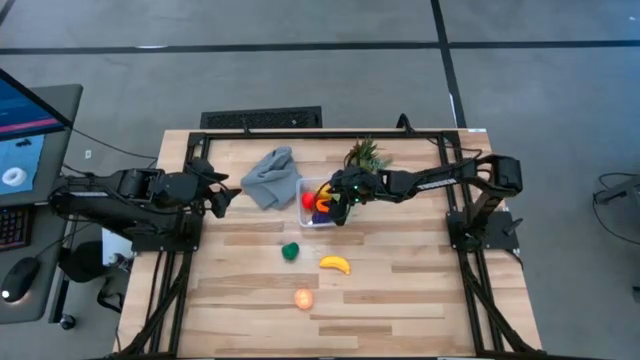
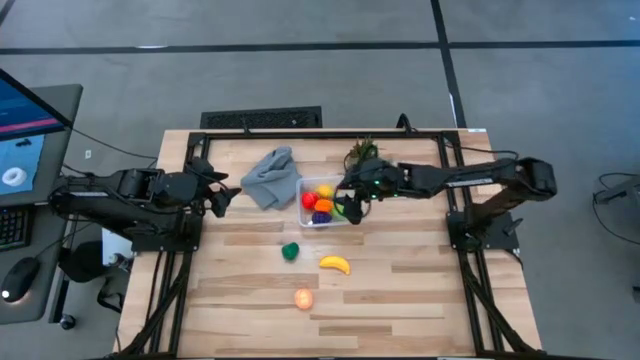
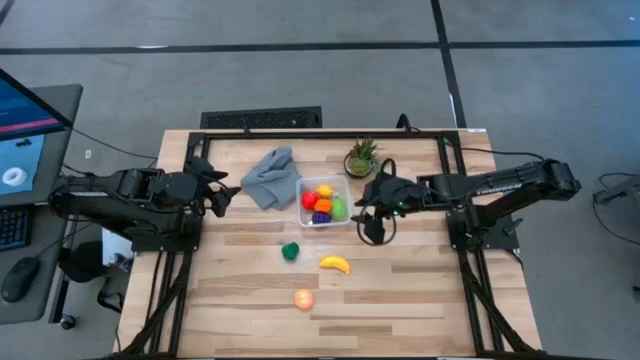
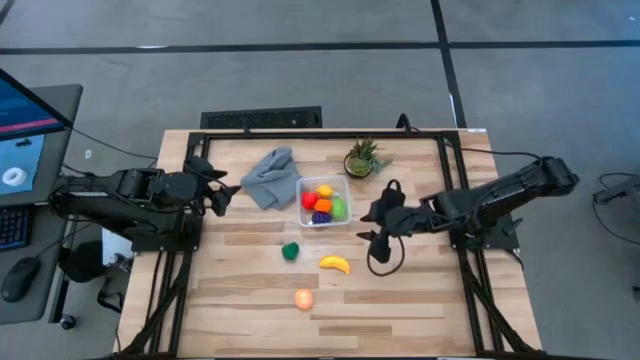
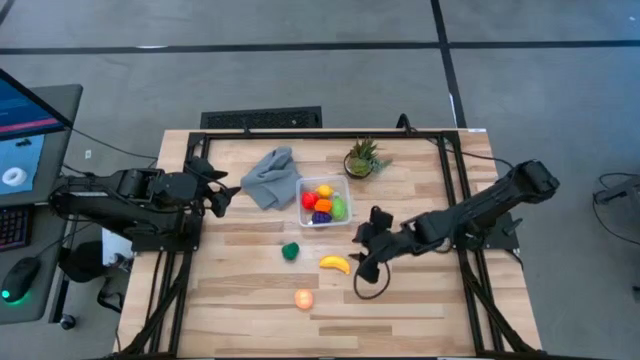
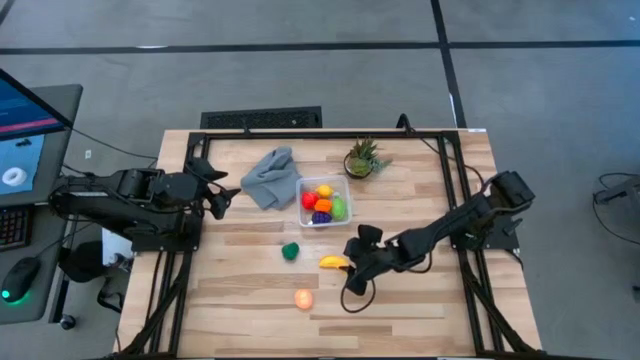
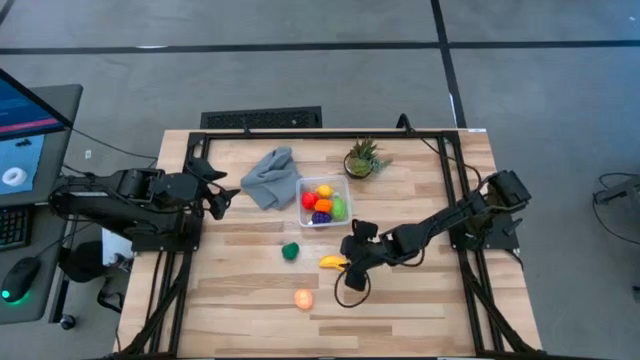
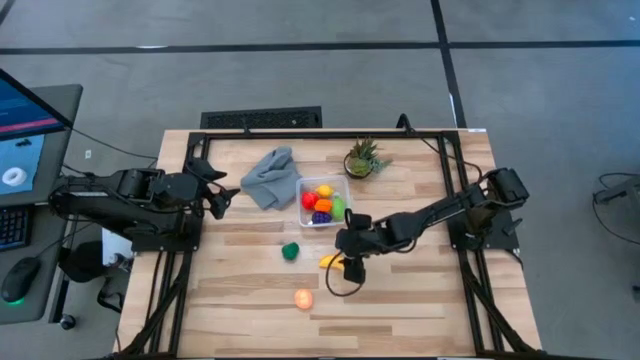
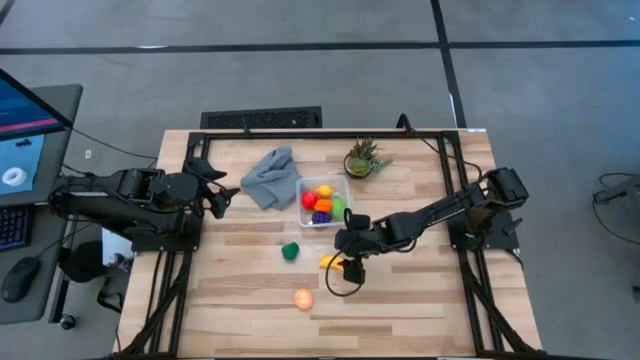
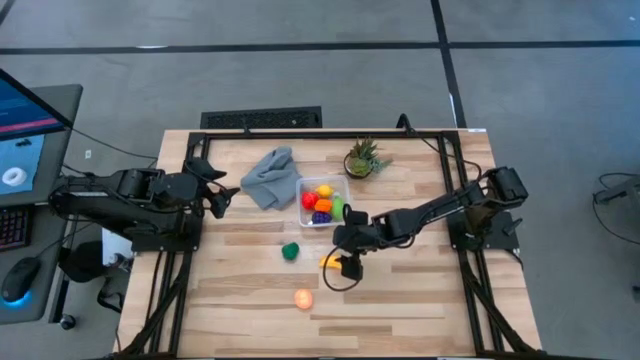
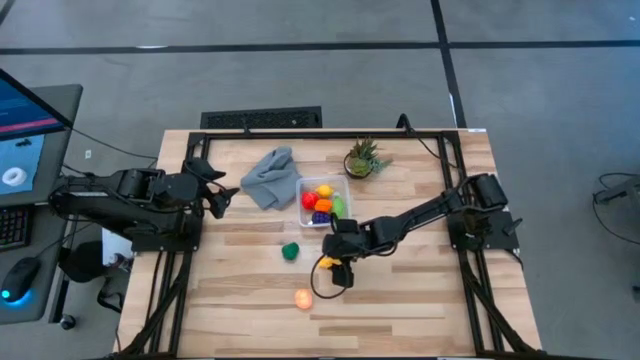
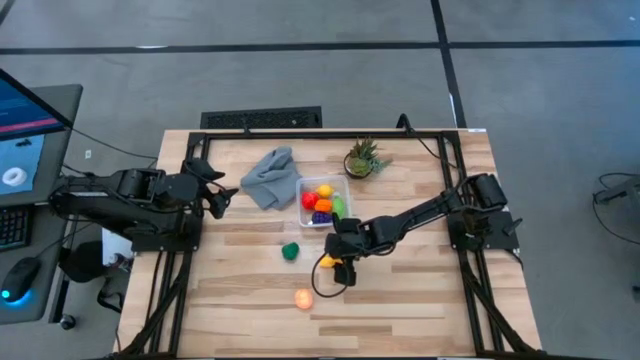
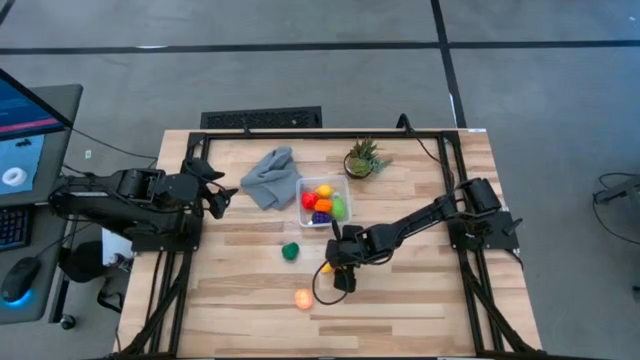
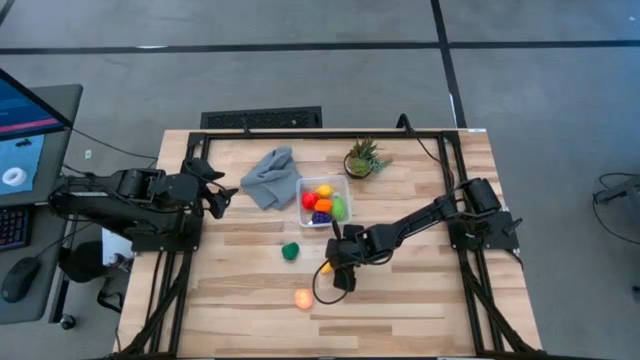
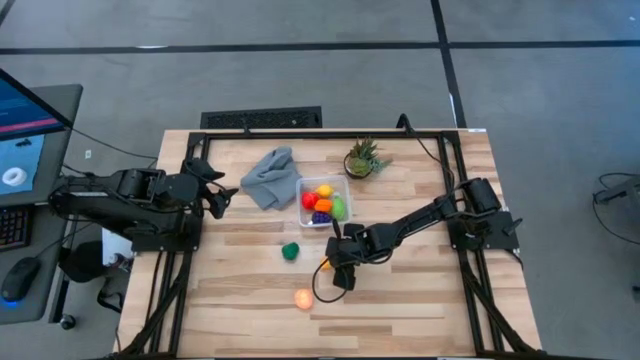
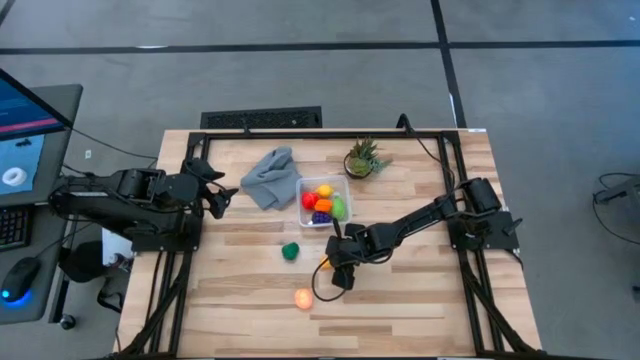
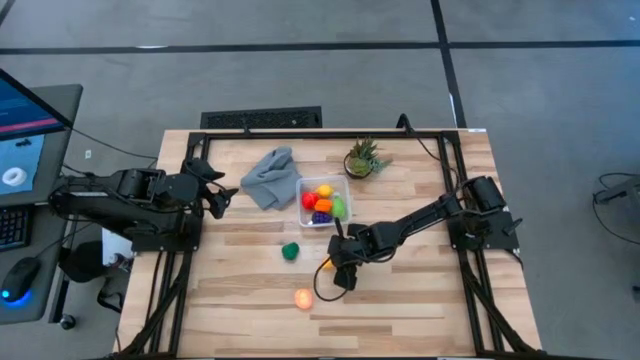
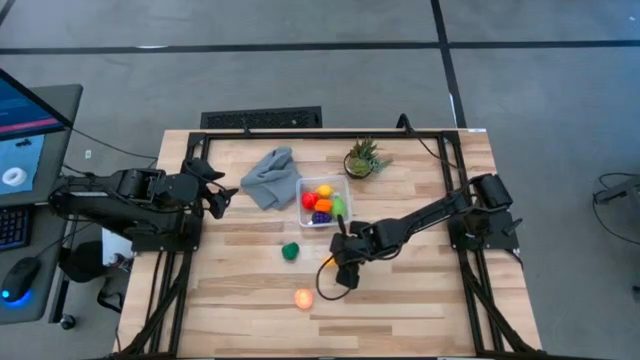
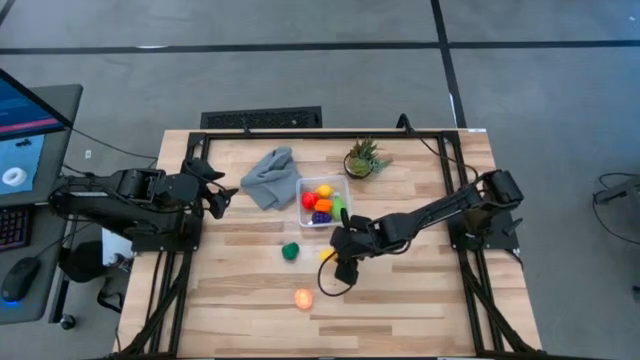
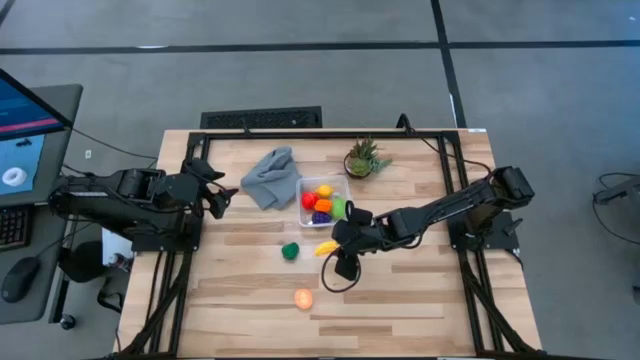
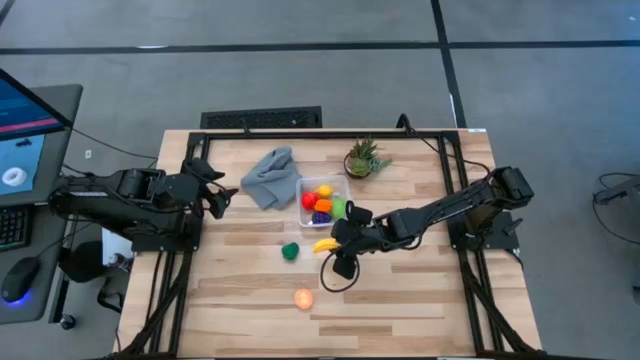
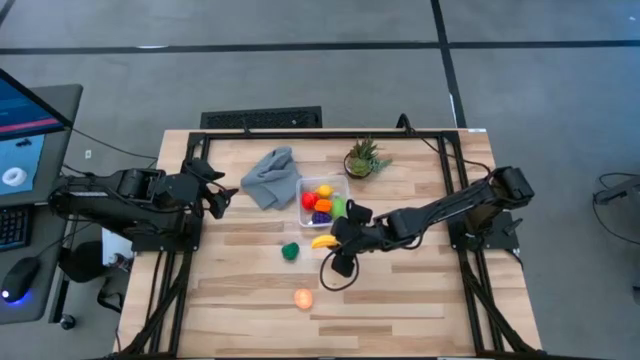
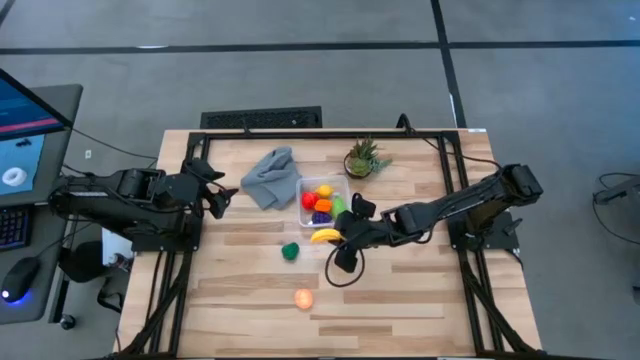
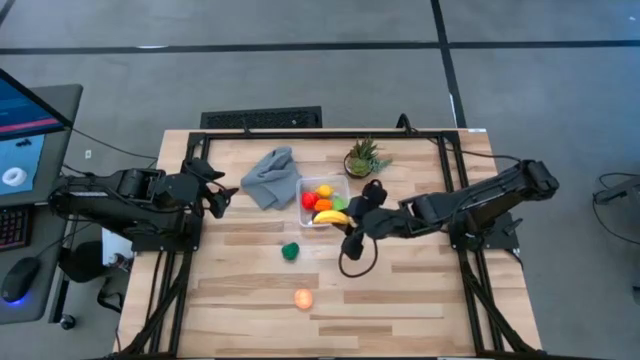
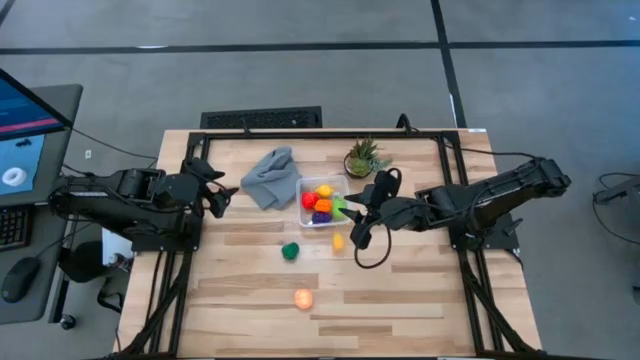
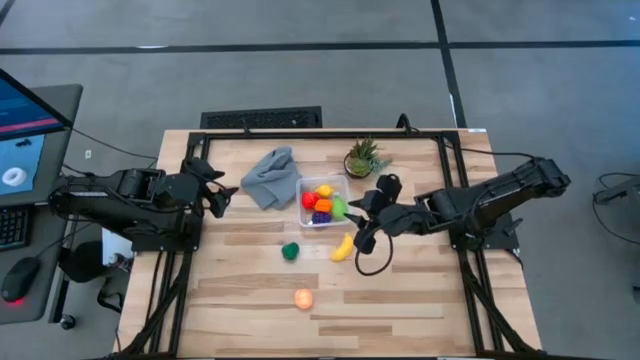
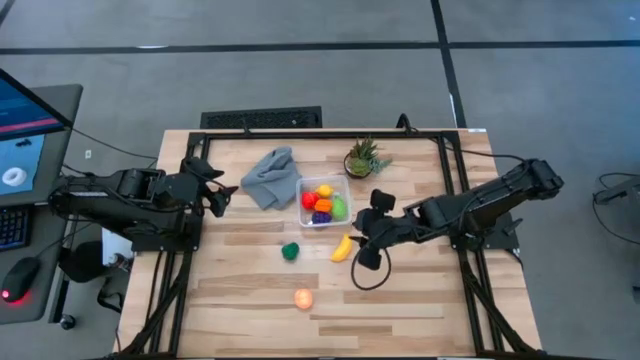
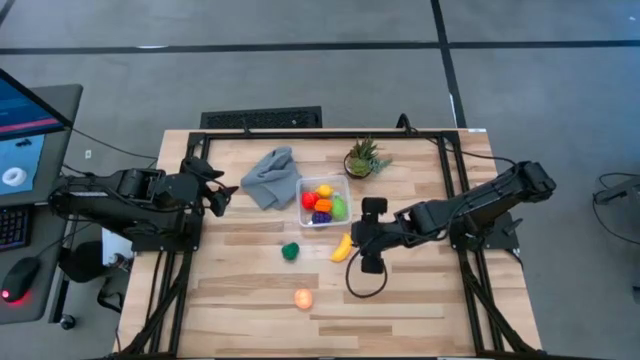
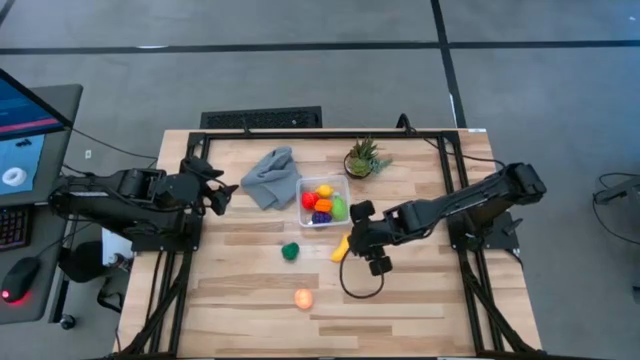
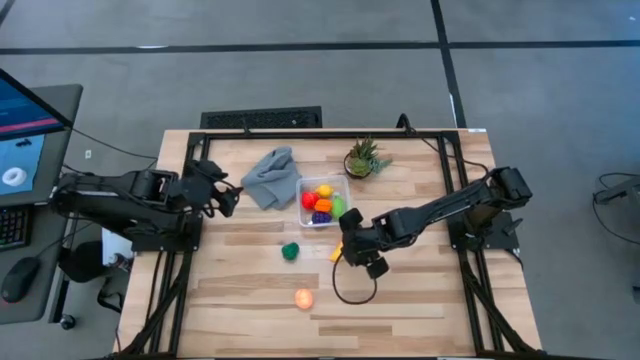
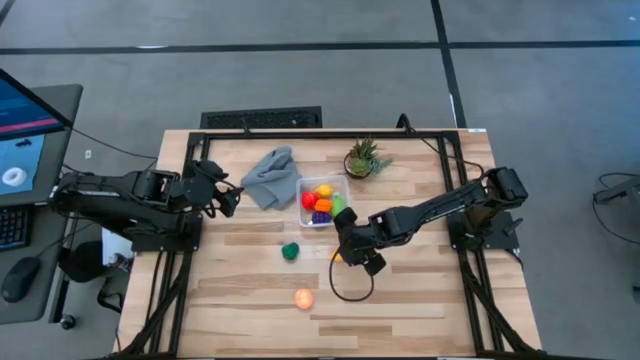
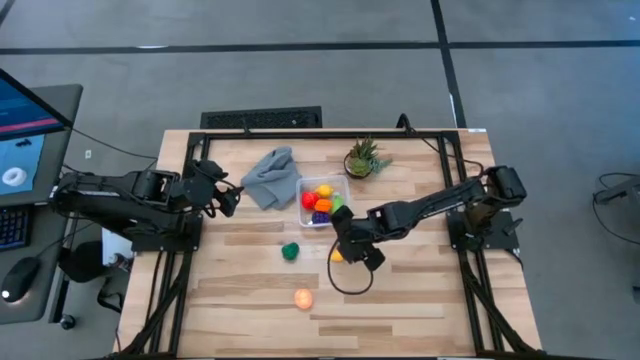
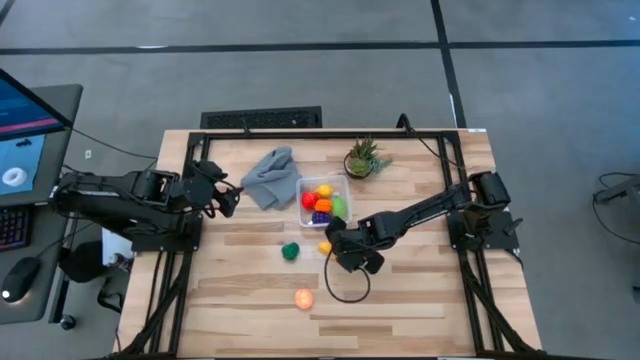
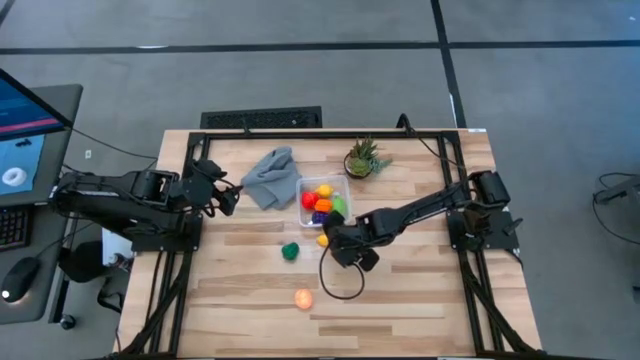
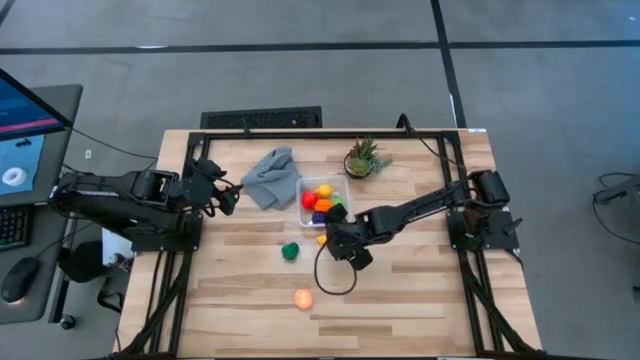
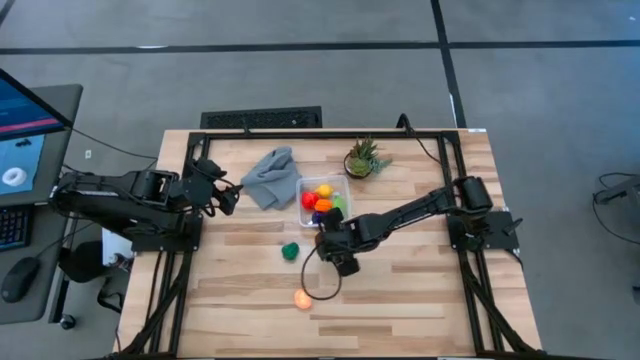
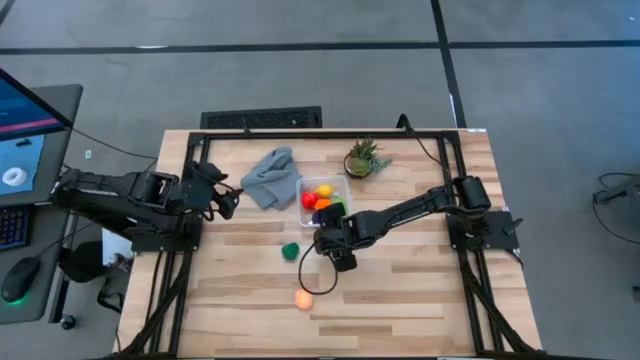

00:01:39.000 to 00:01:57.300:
Task: Pick and placing Produce into tupperware
Put the yellow banana into the transparent bin

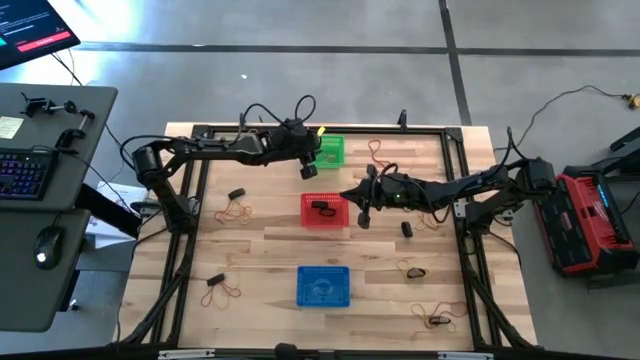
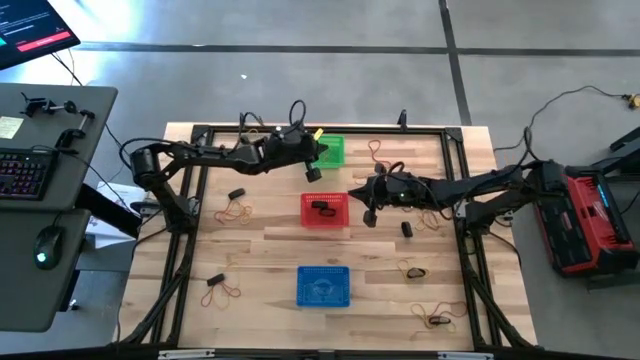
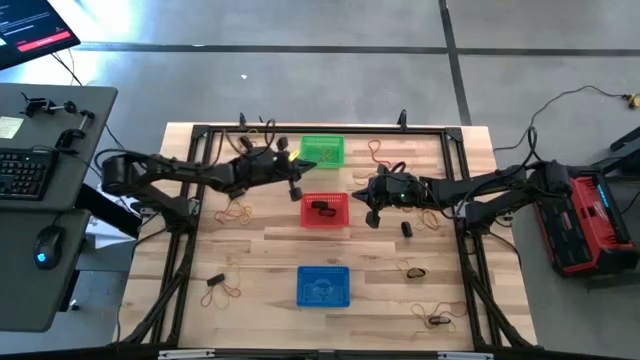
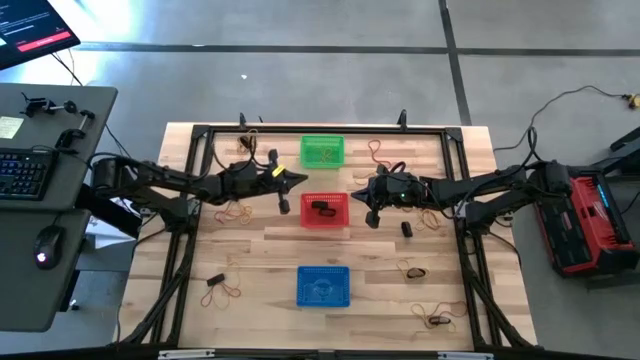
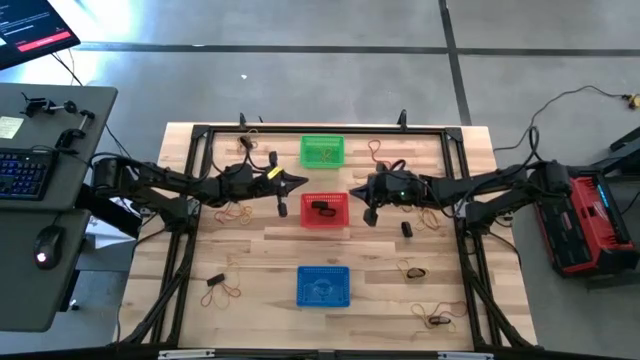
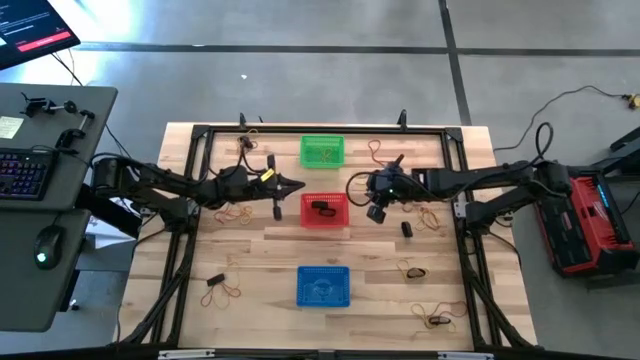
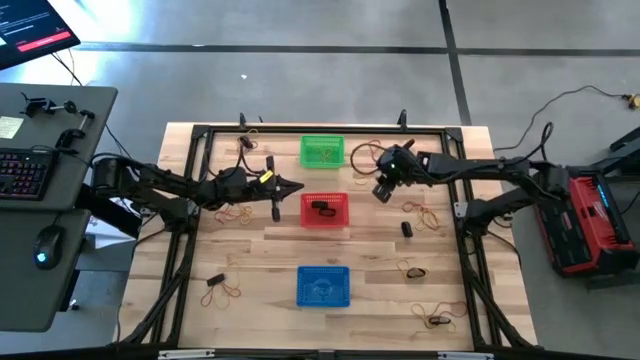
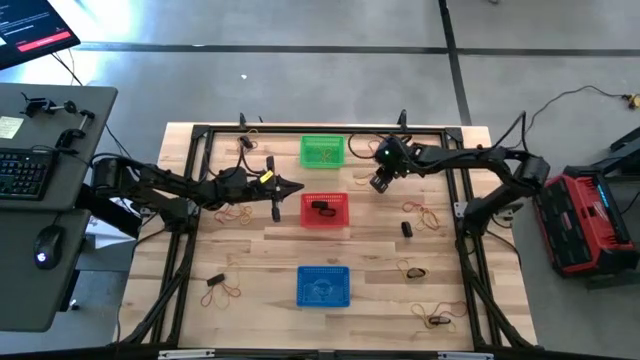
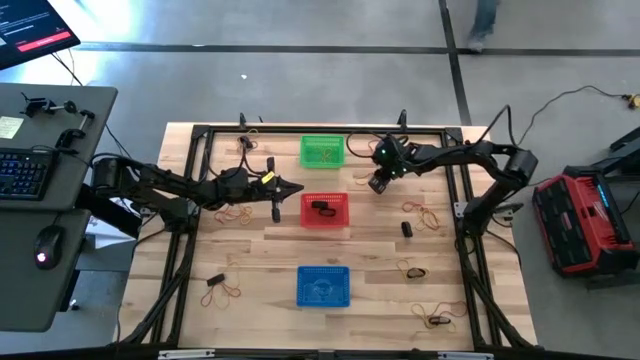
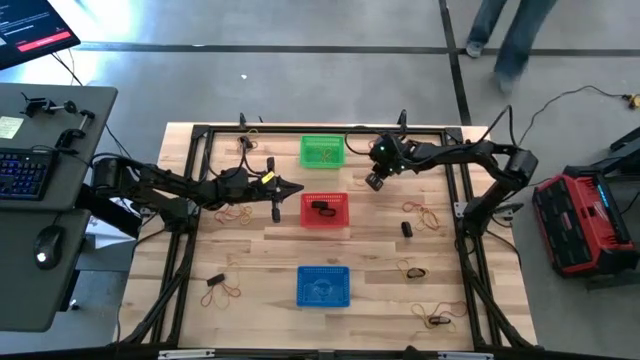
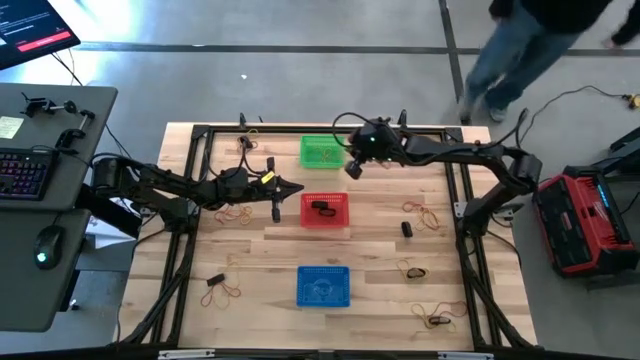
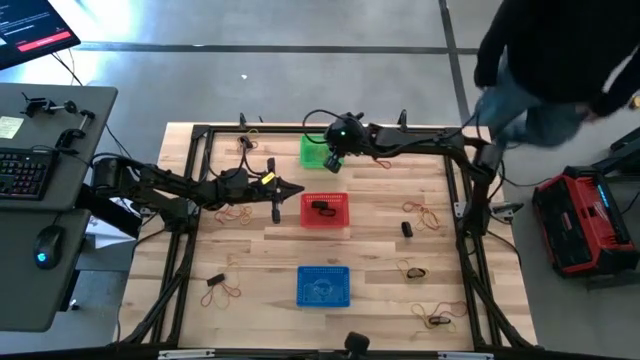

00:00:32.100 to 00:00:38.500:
Task: Sort rubber bands into baskets
Put the yellow rubber band into the green bin
